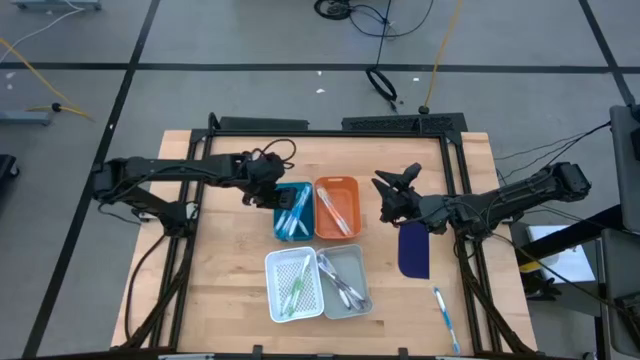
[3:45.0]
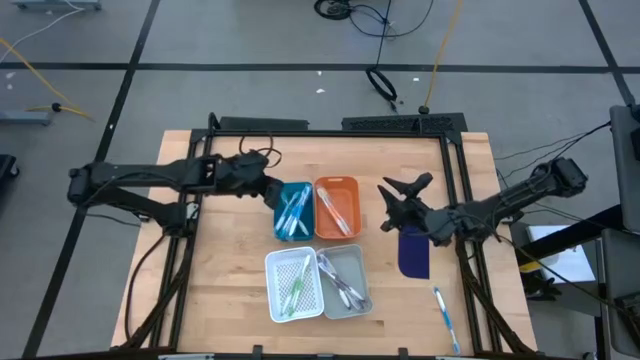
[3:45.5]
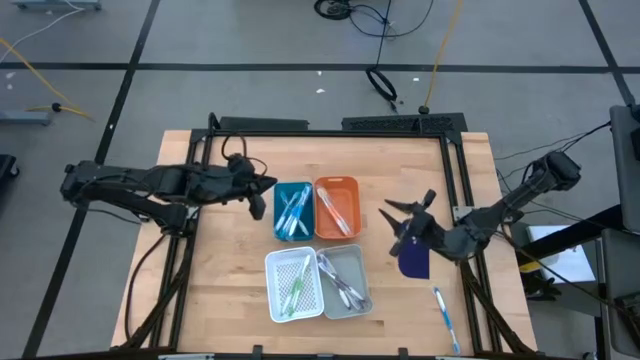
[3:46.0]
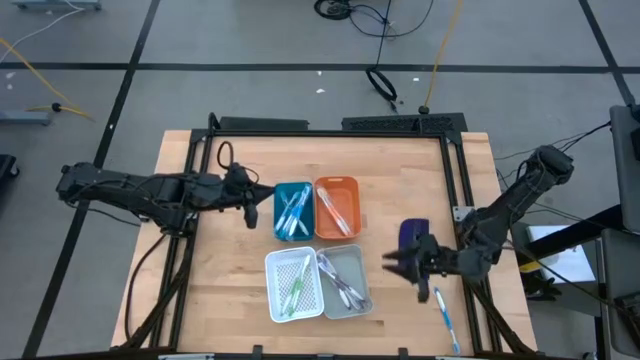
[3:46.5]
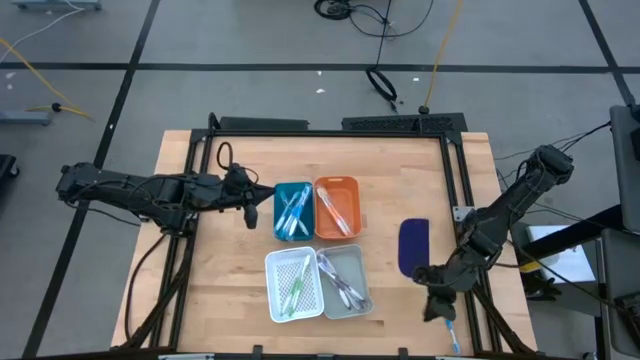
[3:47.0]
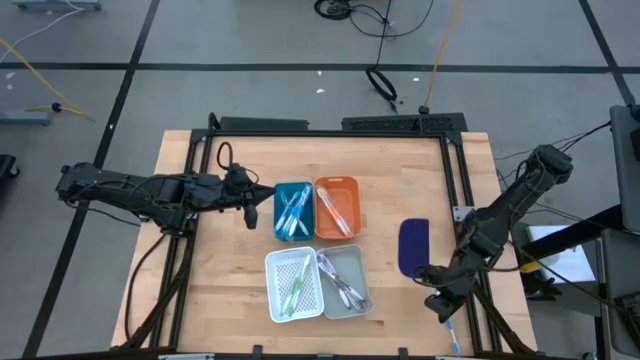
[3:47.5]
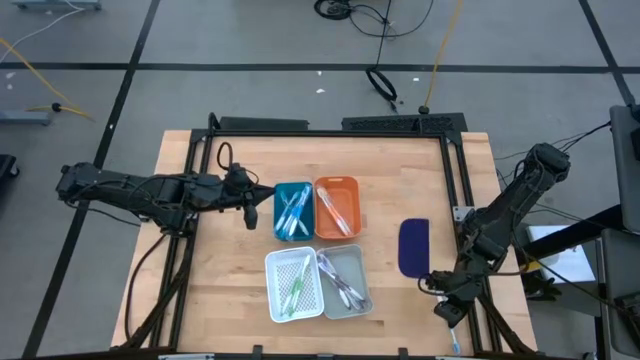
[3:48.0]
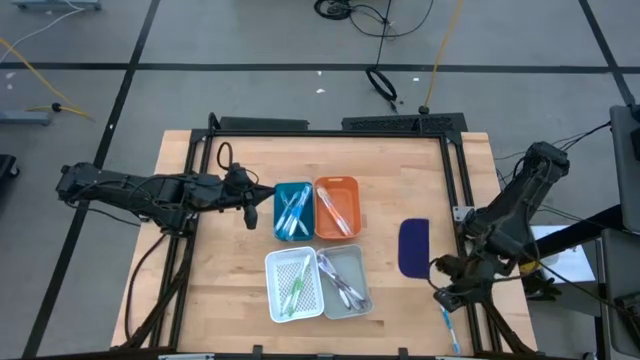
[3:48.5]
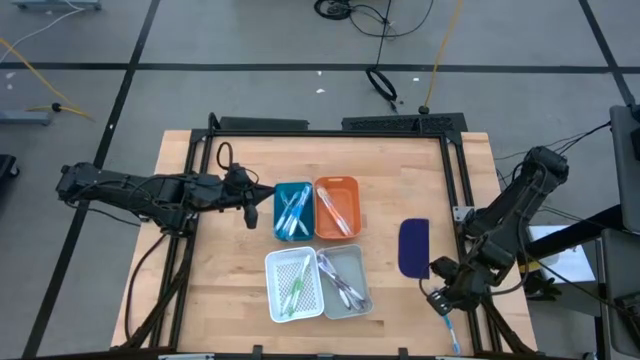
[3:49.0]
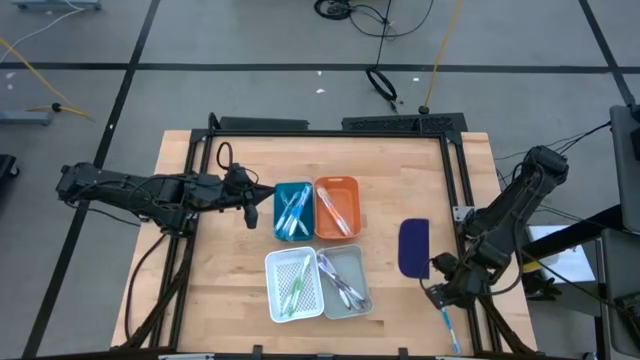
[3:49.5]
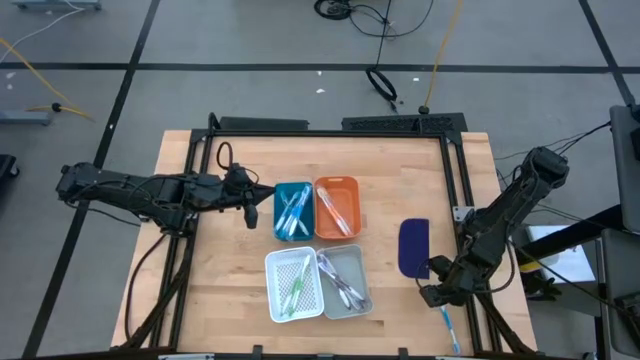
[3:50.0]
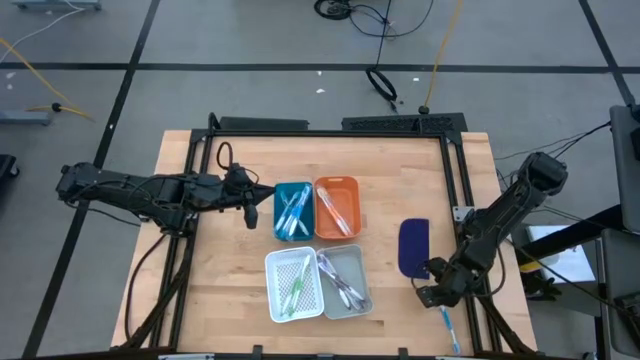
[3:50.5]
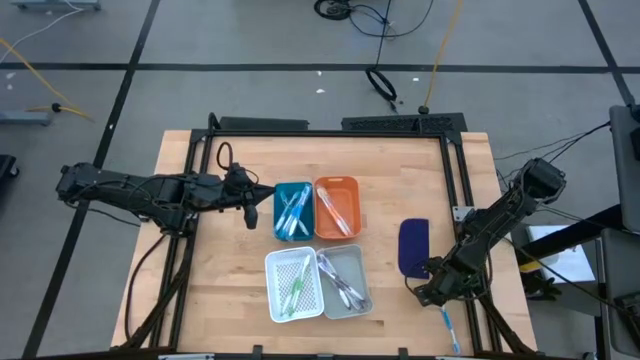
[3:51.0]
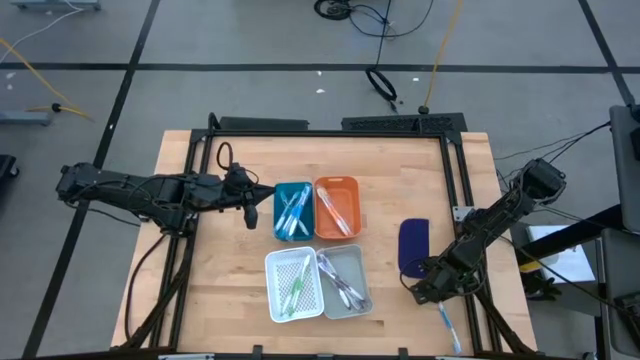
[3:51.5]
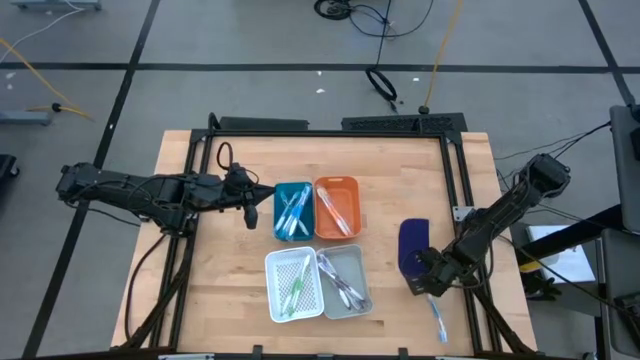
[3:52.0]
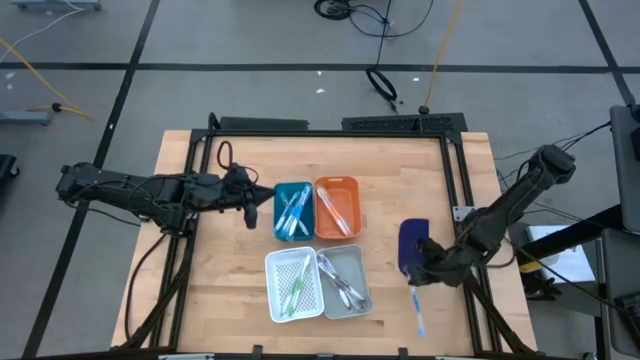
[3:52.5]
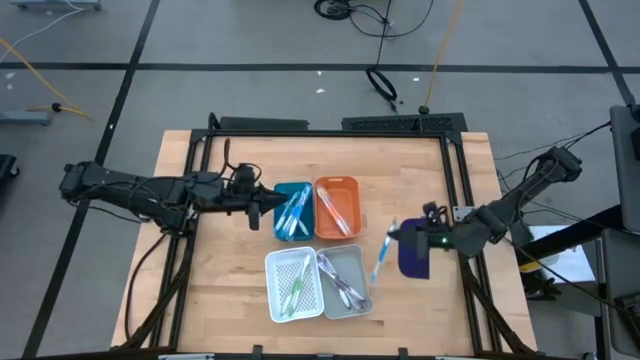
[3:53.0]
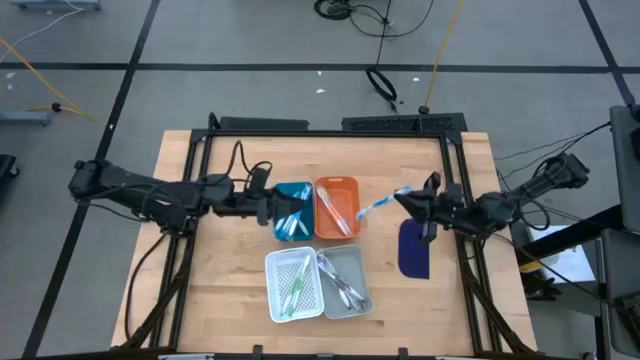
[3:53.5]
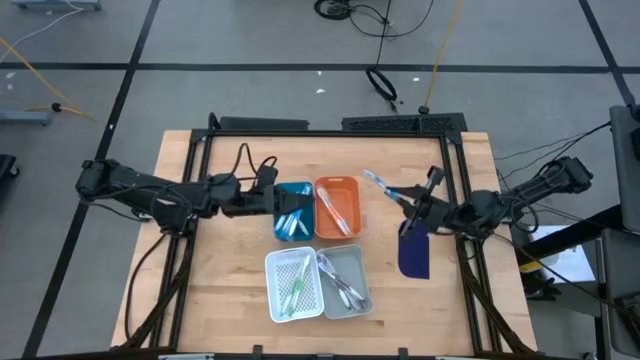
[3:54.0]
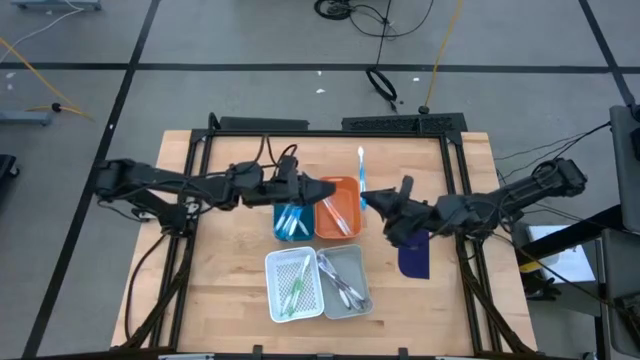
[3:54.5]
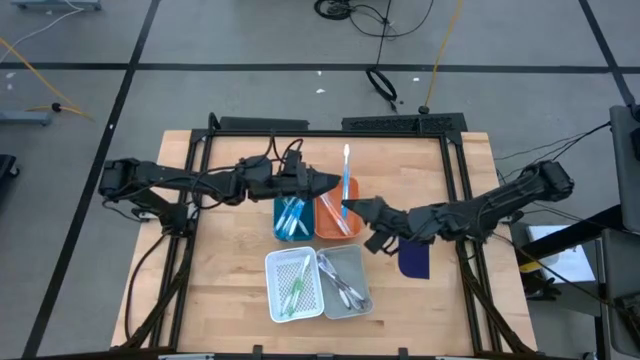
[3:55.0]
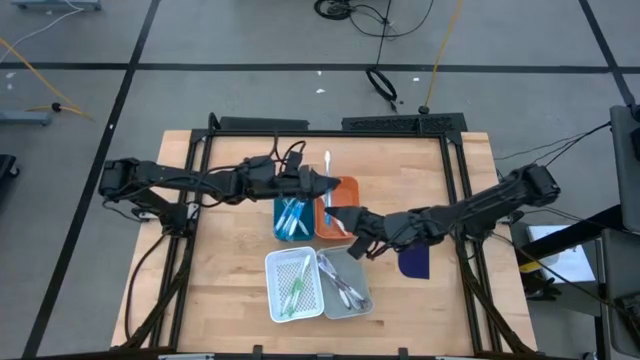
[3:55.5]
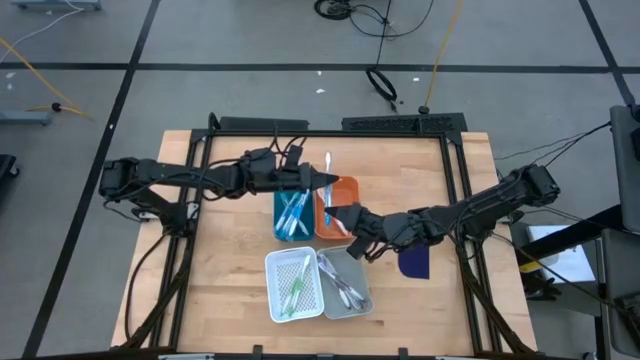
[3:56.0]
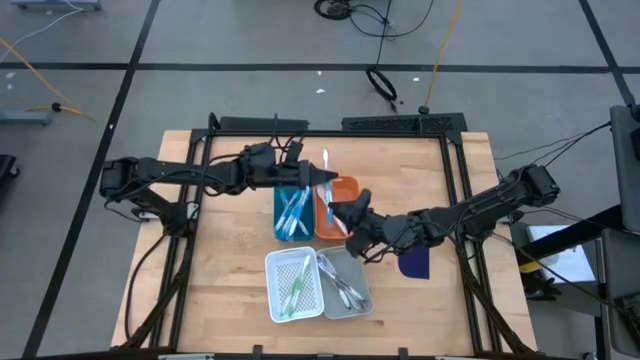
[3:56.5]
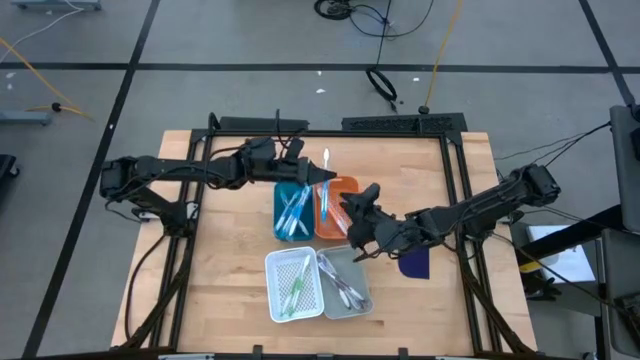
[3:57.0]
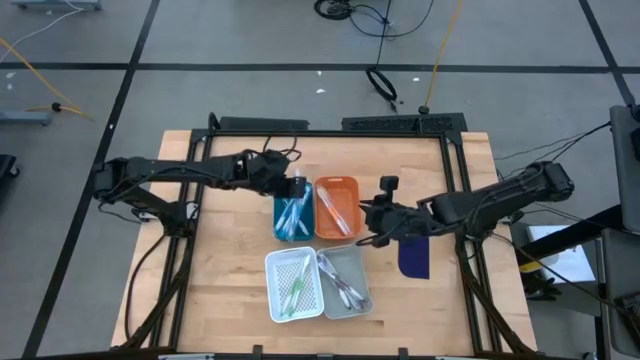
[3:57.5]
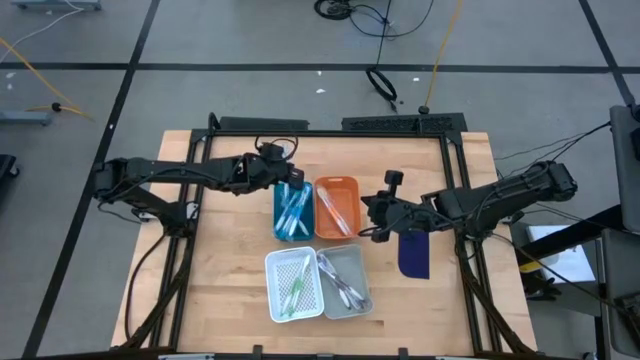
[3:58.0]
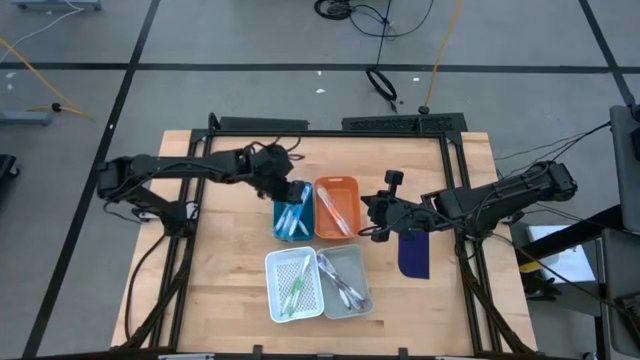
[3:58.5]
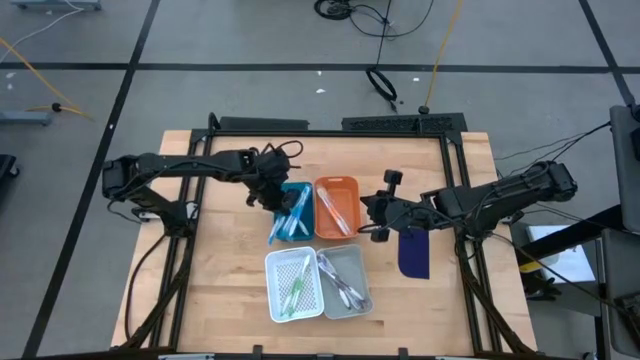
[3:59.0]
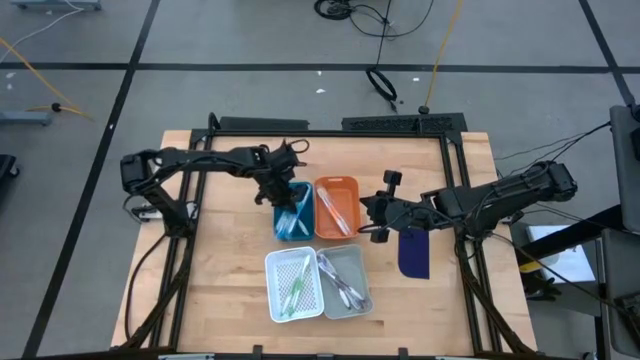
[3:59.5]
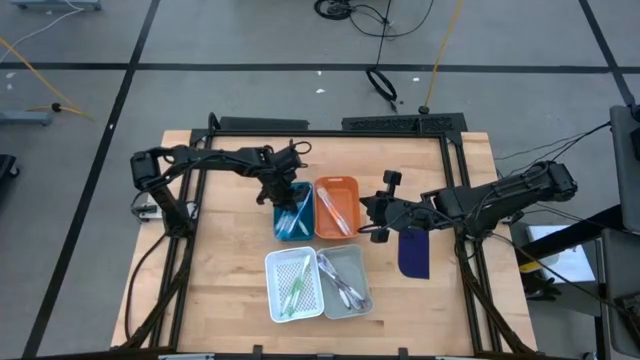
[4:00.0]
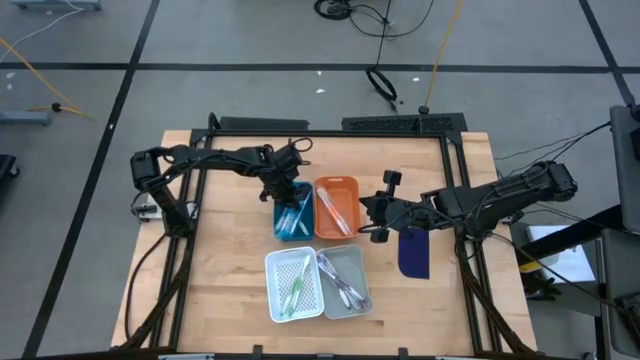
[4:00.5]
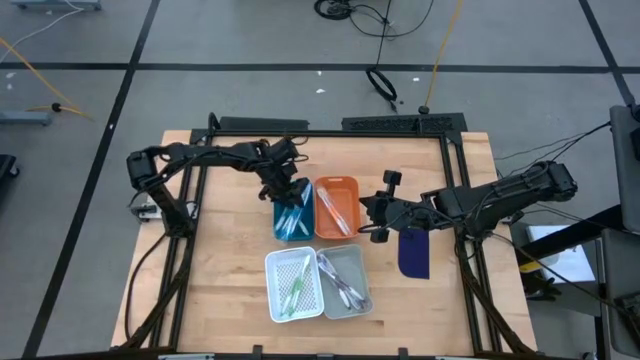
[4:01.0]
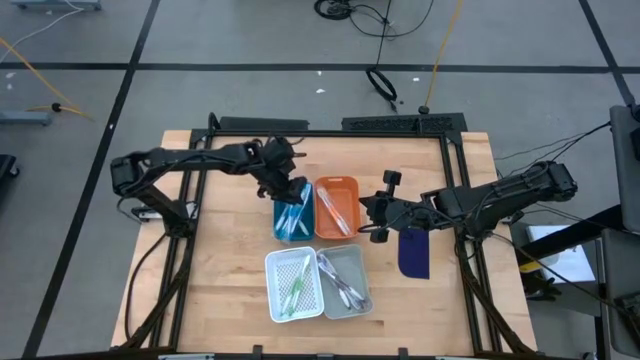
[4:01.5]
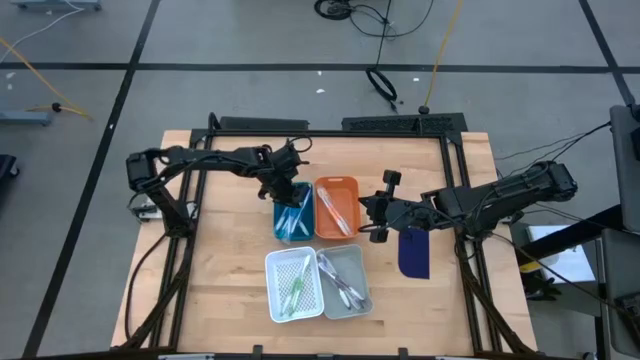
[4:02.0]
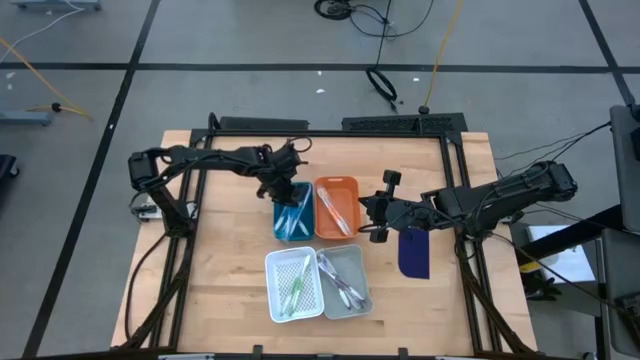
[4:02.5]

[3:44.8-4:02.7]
Task: Pick & Place Toothbrushes
Put the blue toothbrush into the blue bin

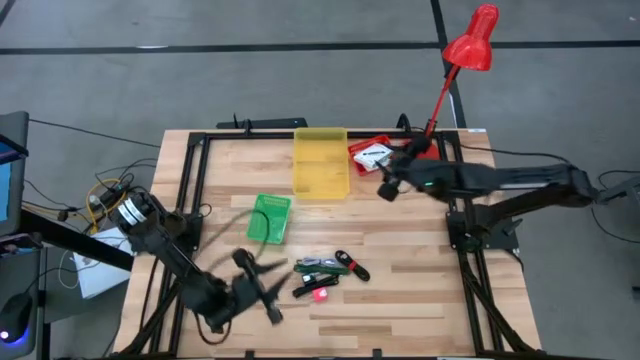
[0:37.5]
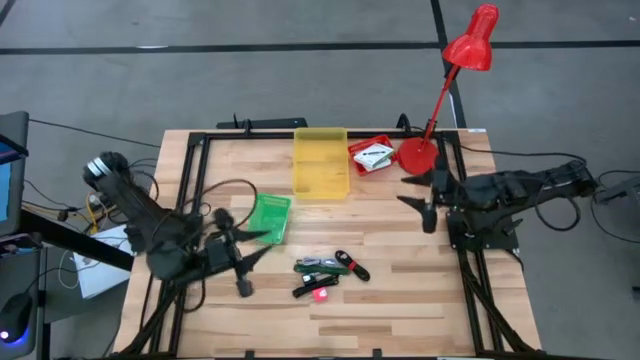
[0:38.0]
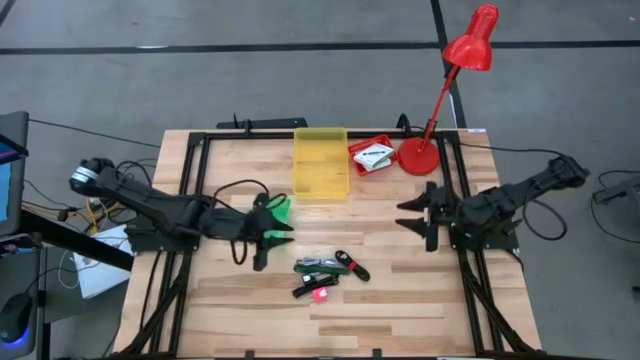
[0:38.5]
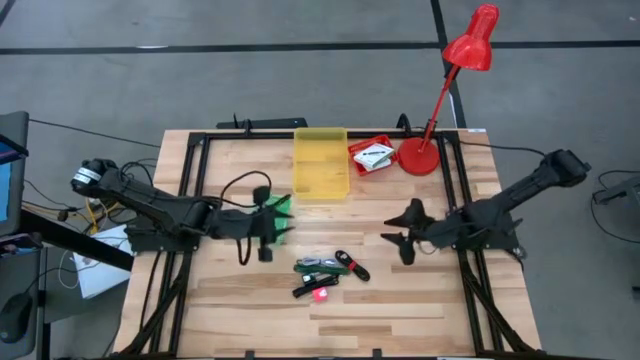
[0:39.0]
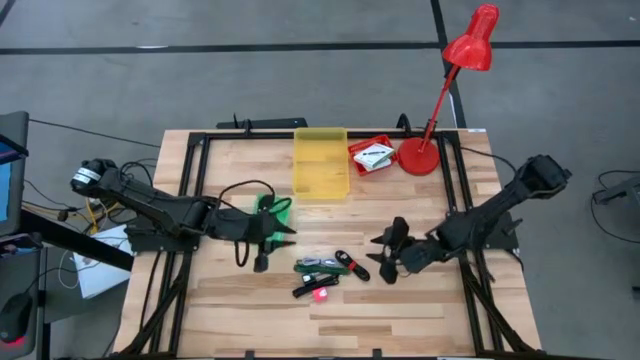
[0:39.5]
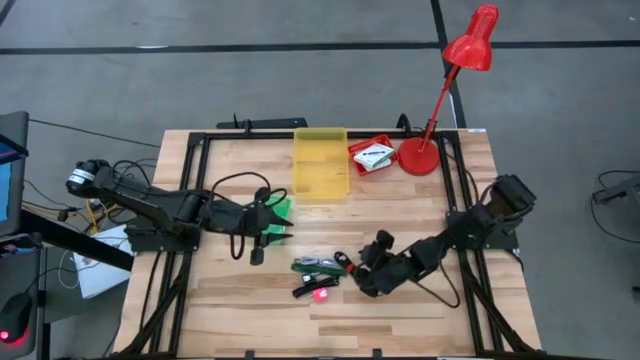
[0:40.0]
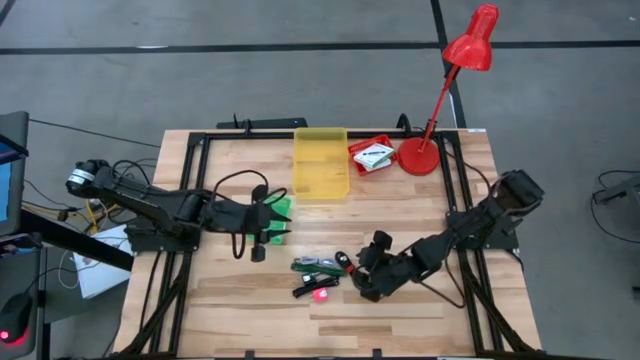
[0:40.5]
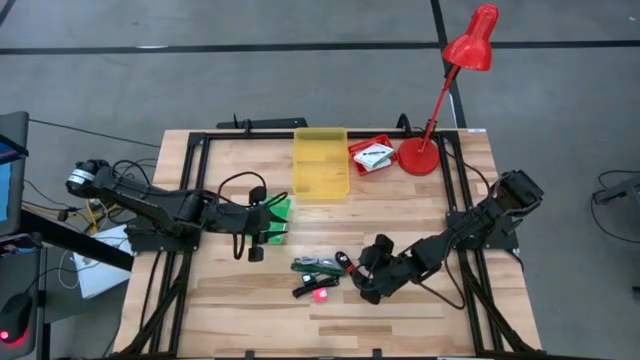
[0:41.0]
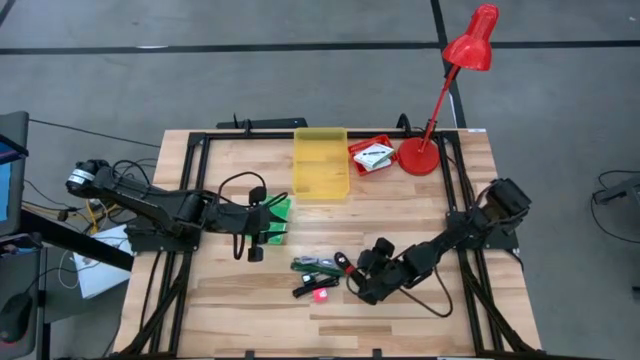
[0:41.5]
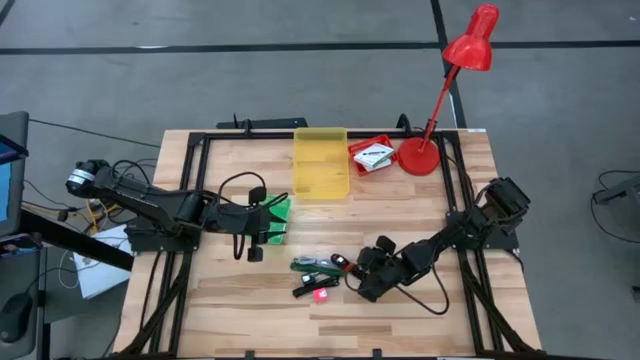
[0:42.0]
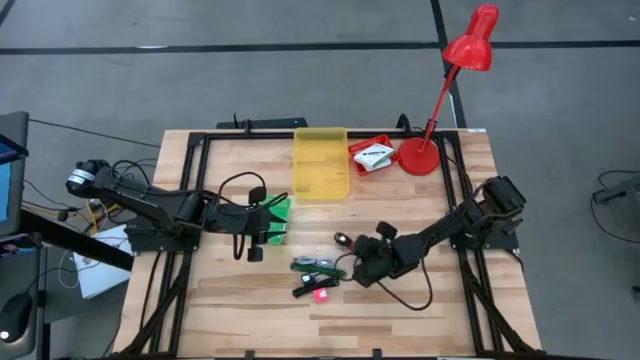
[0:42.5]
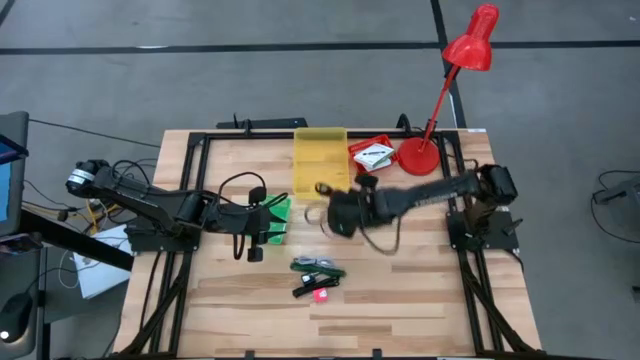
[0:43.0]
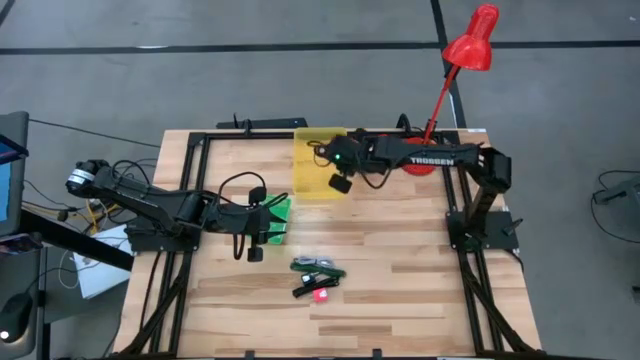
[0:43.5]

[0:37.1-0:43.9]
Task: Pick and place items into bin
Put the right black charger cable into the yellow bin
